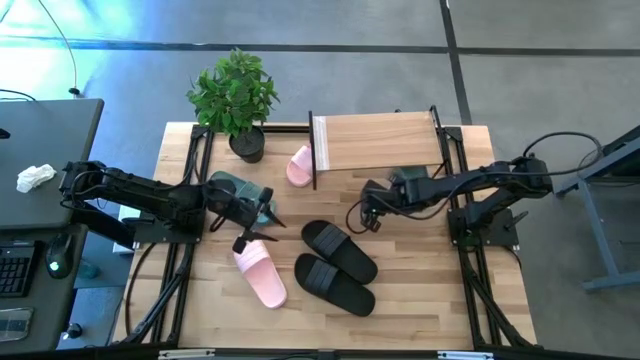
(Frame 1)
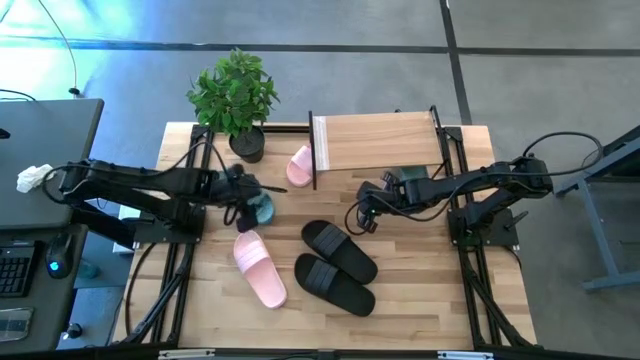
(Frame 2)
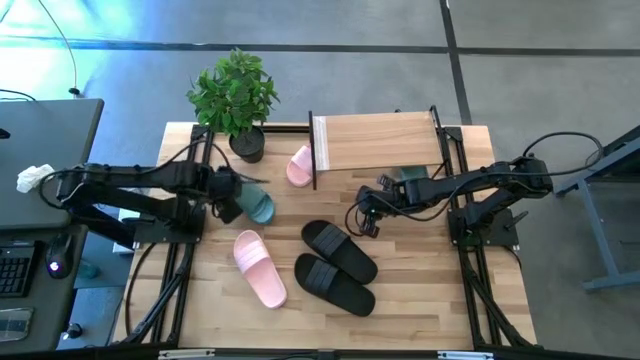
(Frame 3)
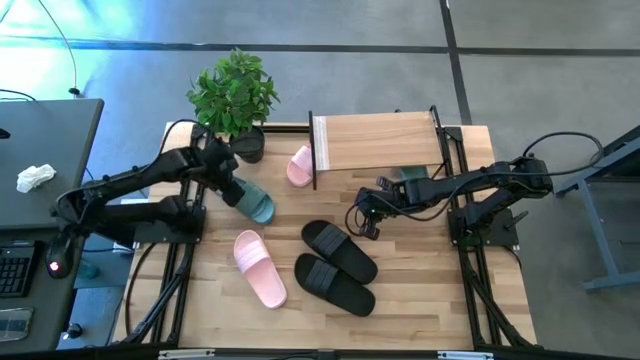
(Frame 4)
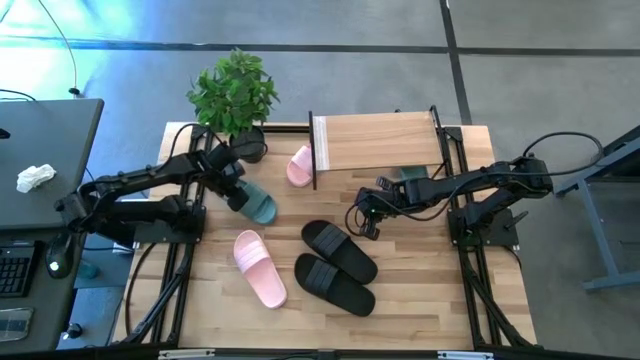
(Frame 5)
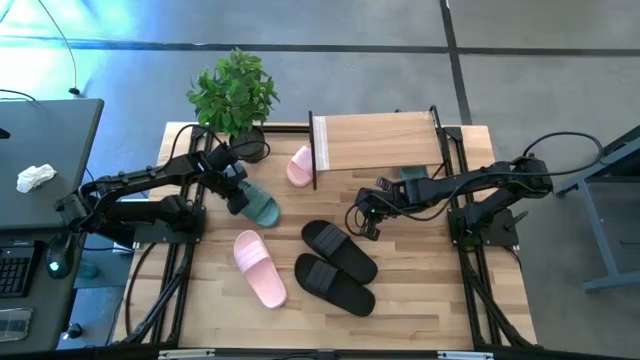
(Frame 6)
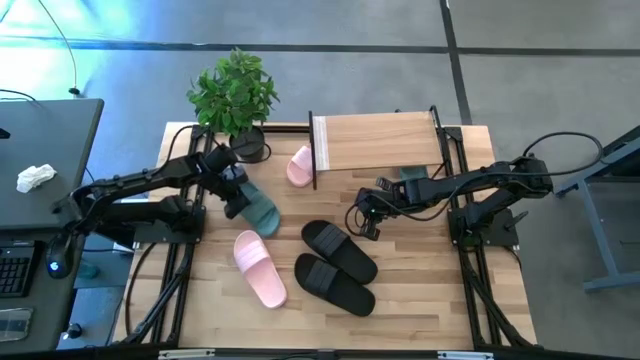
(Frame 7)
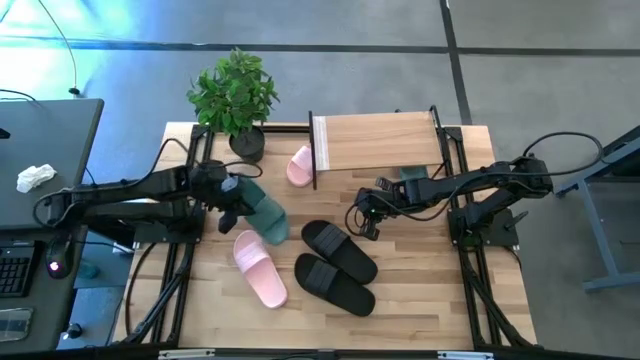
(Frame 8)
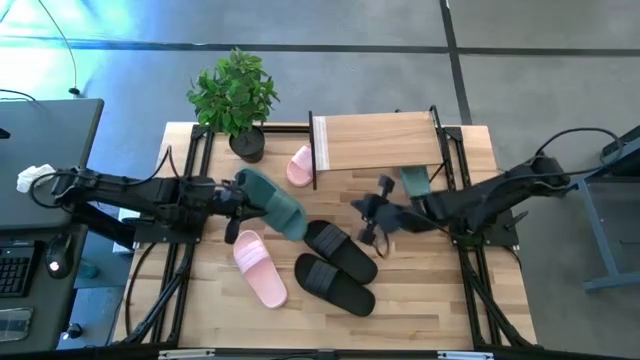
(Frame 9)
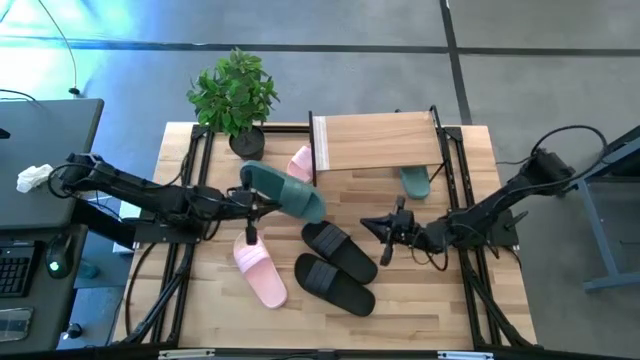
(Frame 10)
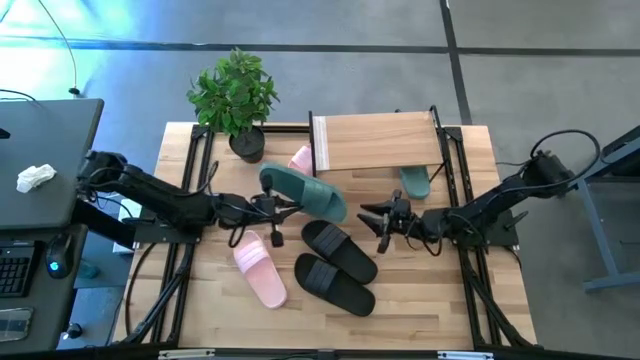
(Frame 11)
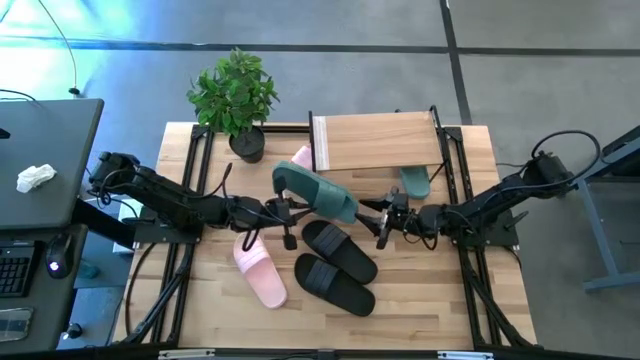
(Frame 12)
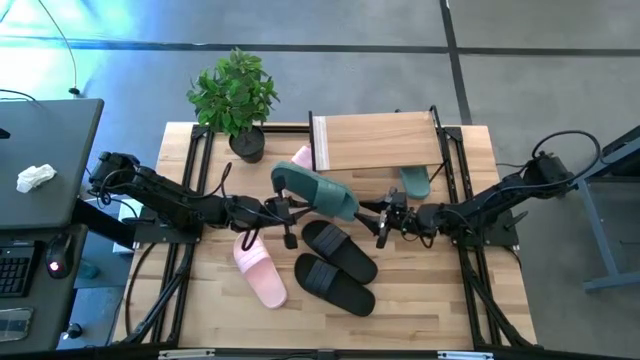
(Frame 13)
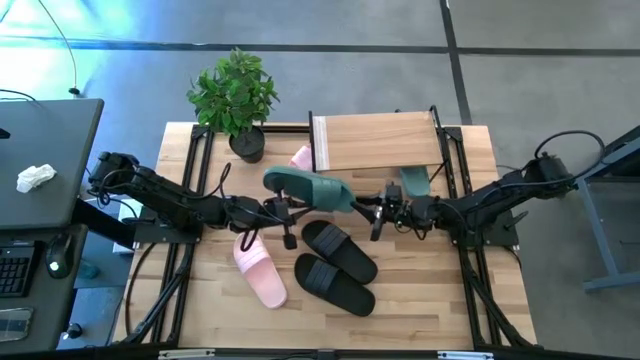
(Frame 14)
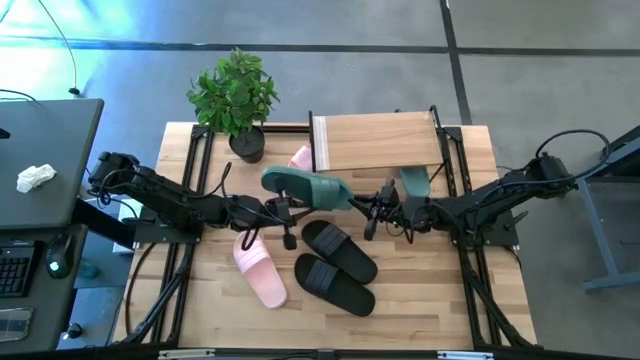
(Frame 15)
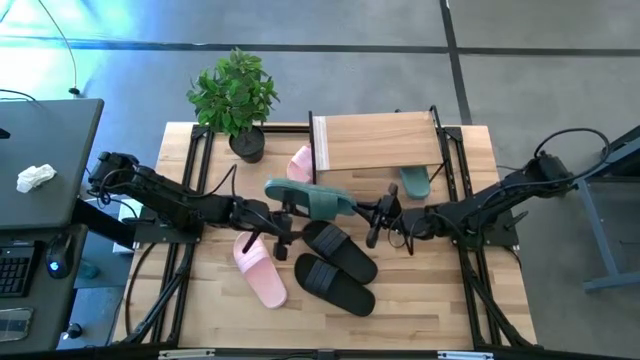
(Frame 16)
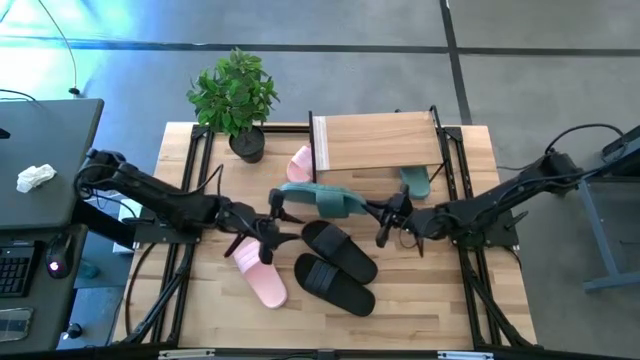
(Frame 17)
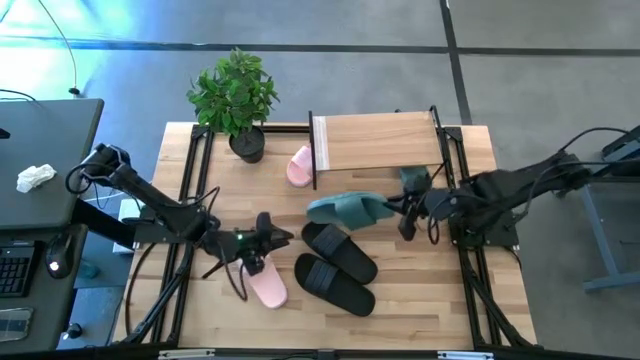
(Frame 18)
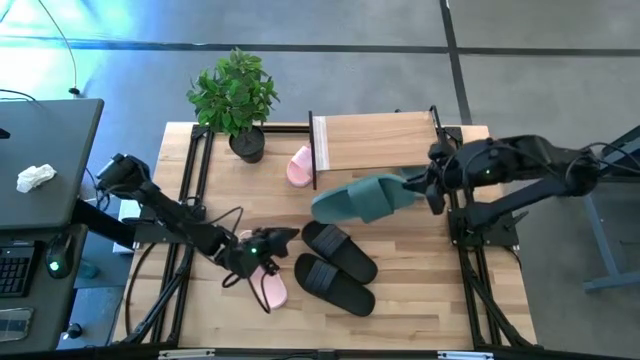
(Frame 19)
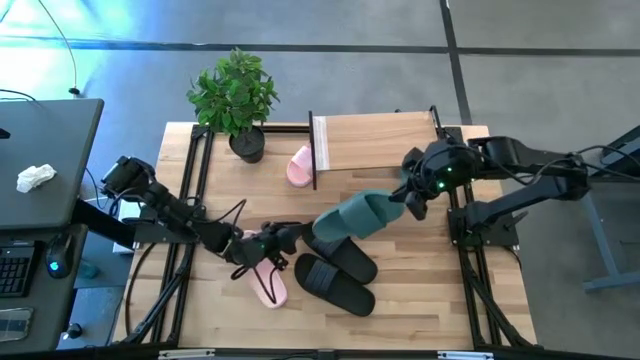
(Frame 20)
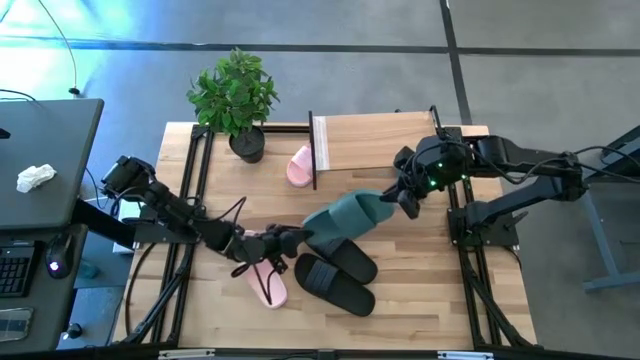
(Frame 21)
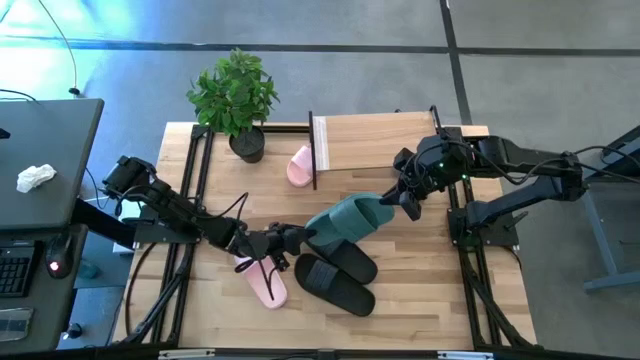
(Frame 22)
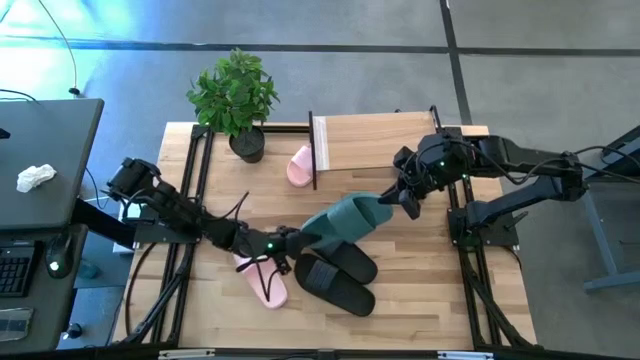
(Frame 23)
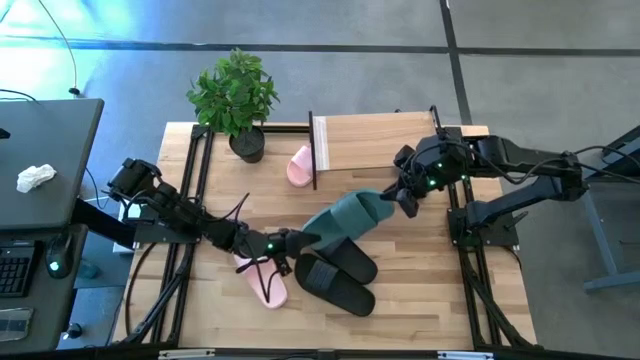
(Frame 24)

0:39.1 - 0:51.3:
Task: Pick and place slides into the shelf
Put the green slide under the shelf

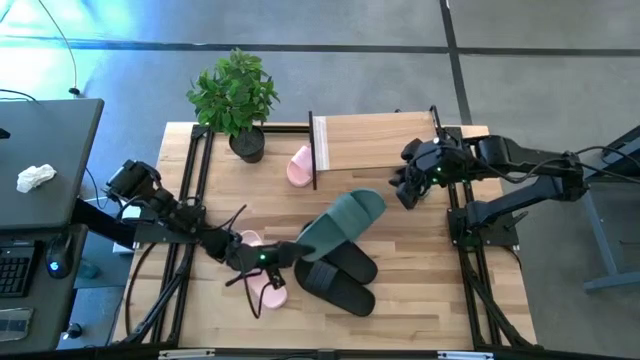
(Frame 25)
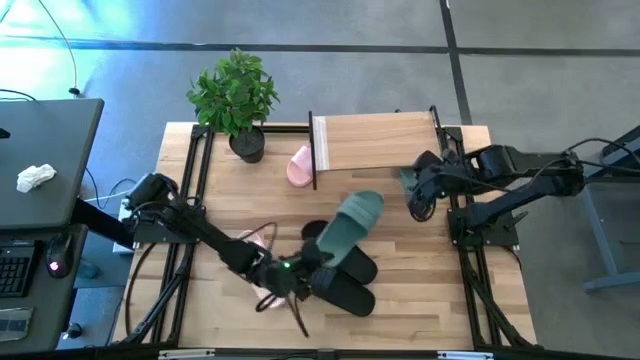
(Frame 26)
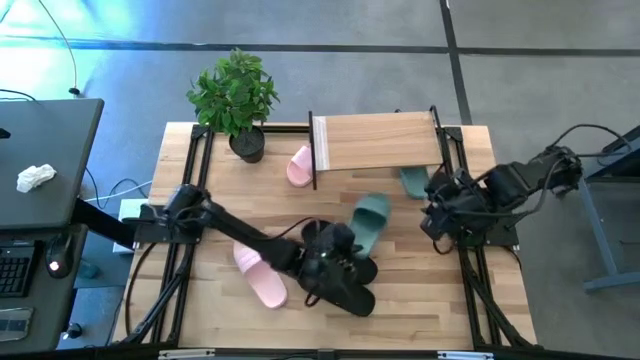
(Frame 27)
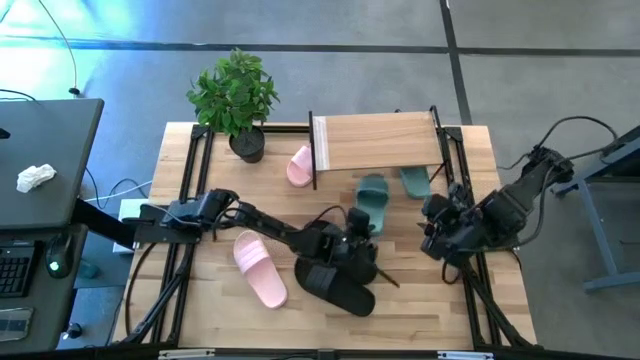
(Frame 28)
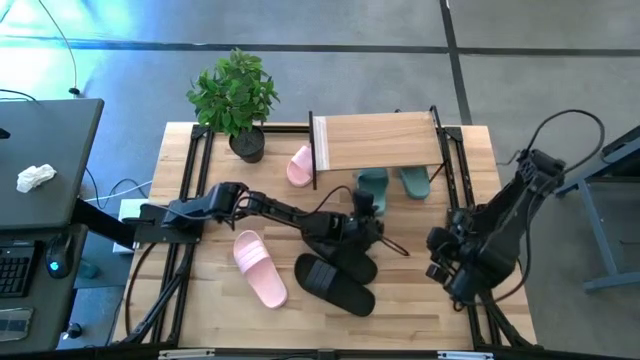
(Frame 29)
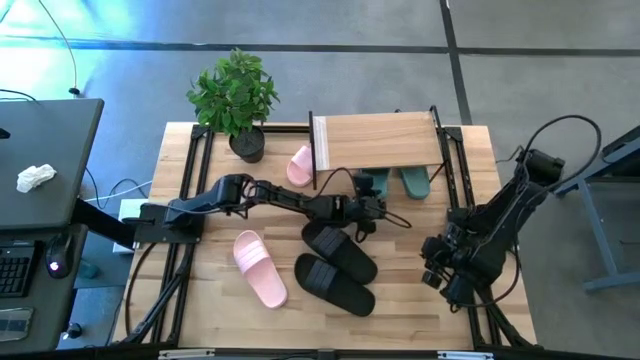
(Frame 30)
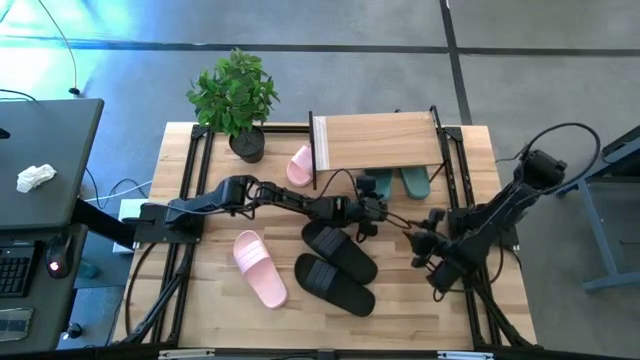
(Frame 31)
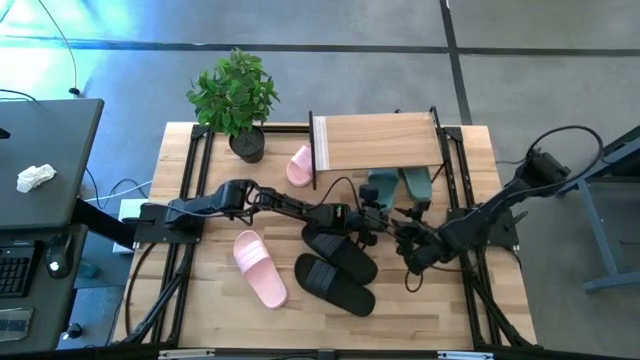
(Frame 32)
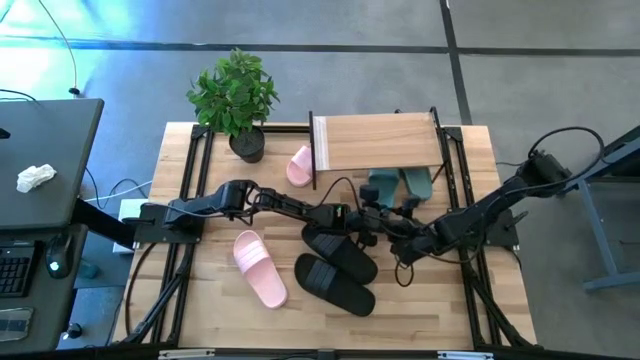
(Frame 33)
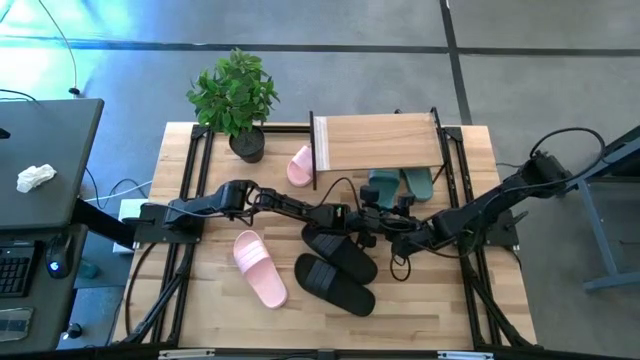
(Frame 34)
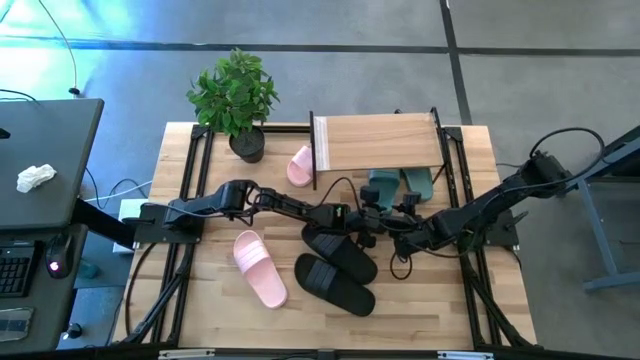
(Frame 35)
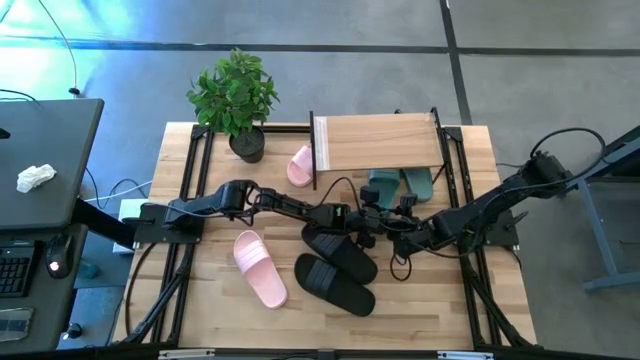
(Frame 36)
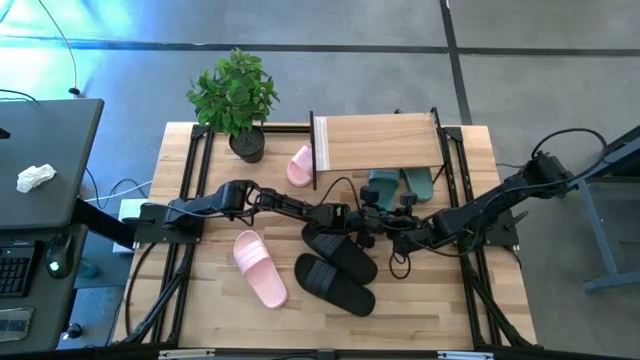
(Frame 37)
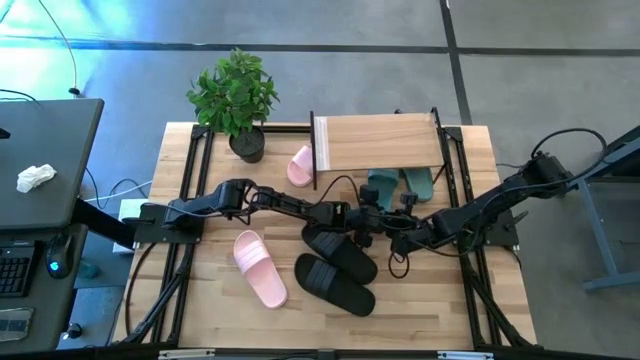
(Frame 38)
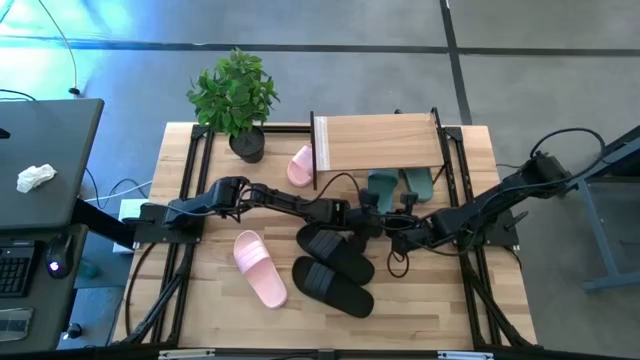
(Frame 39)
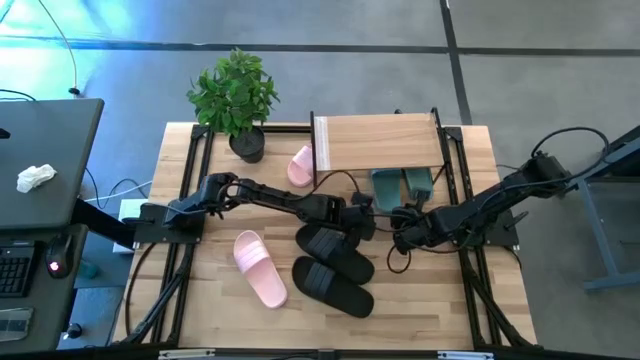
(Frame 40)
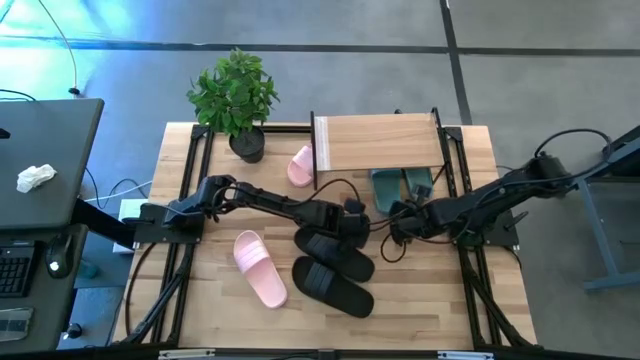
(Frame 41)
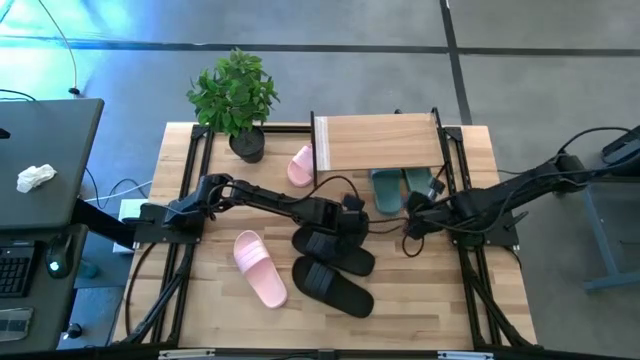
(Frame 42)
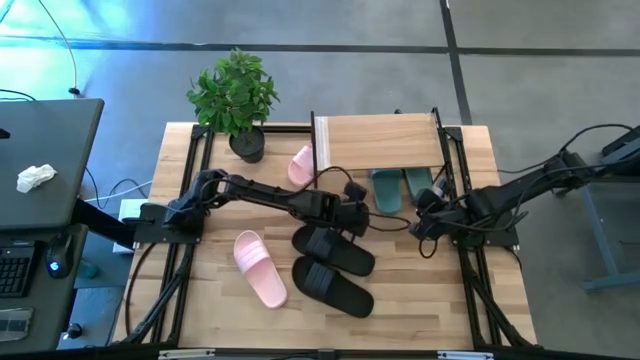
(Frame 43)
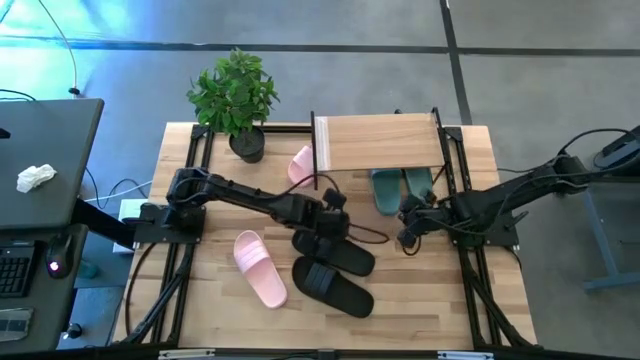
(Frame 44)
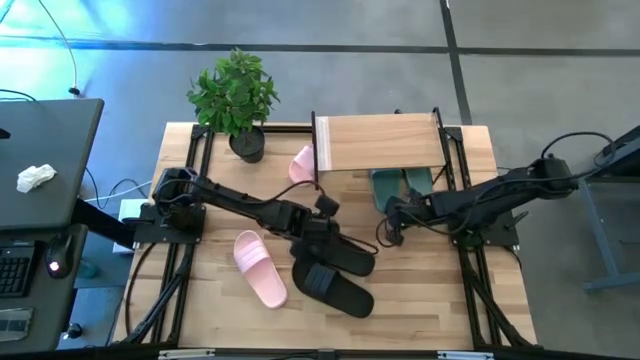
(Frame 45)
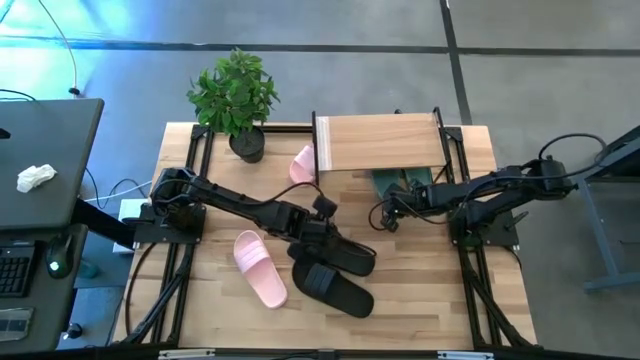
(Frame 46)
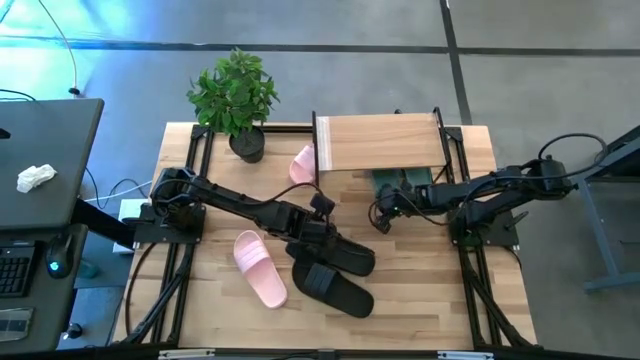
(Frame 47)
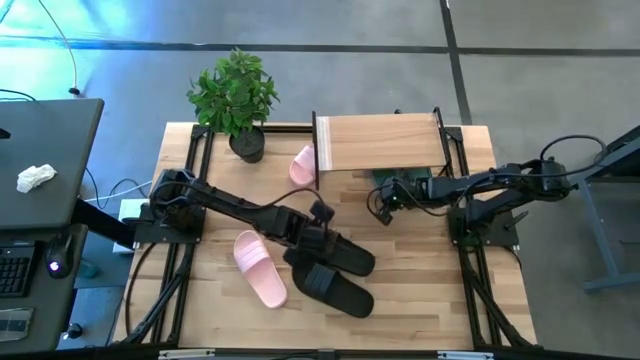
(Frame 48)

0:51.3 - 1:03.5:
Put the green slide under the shelf
